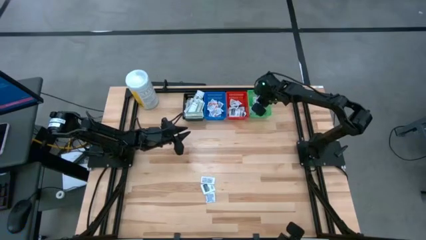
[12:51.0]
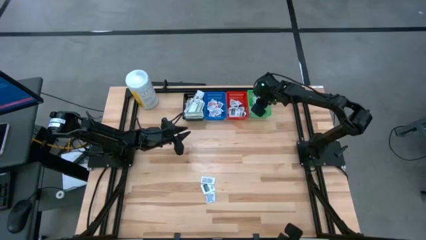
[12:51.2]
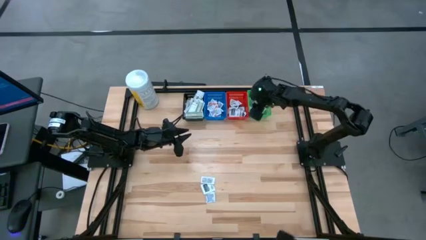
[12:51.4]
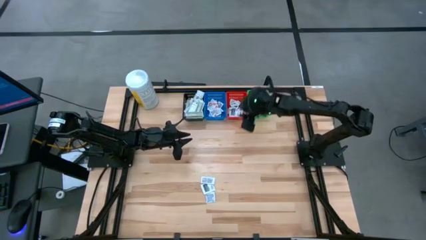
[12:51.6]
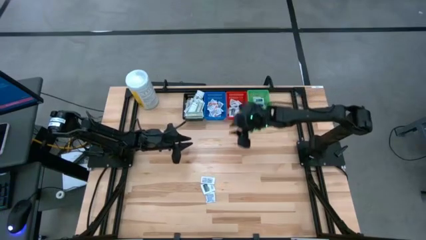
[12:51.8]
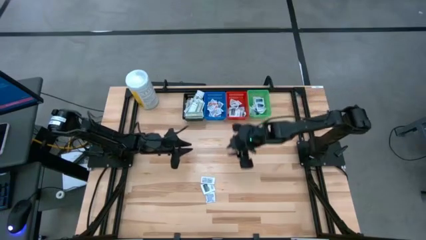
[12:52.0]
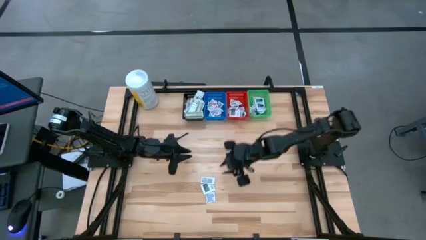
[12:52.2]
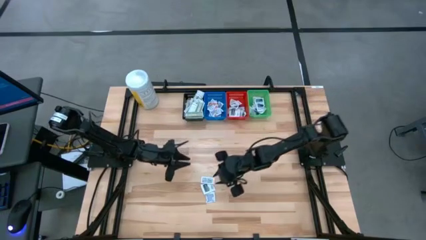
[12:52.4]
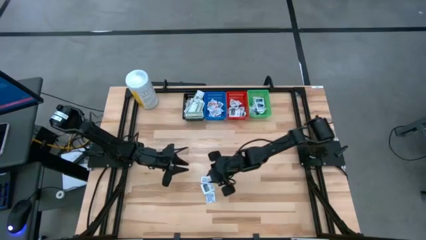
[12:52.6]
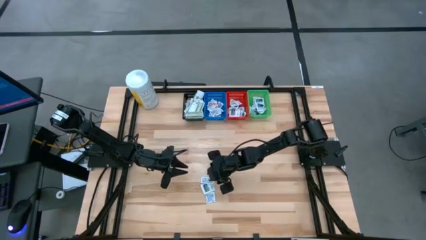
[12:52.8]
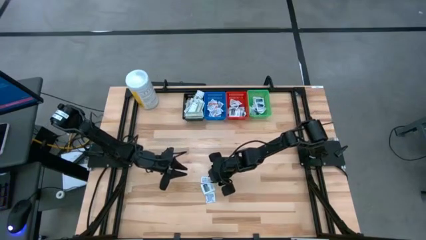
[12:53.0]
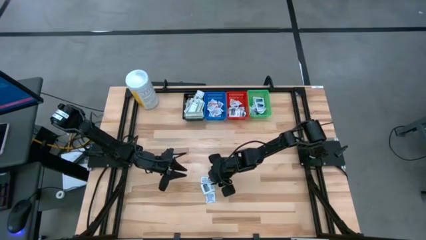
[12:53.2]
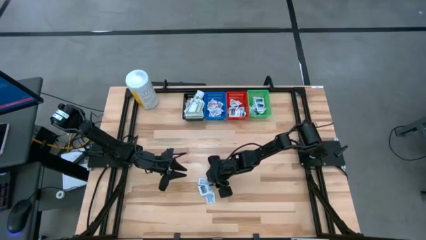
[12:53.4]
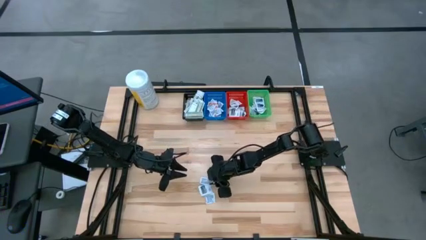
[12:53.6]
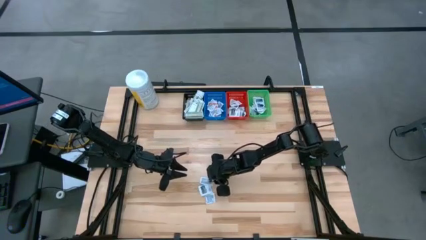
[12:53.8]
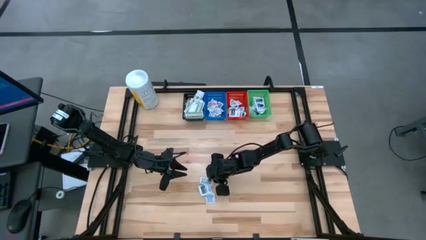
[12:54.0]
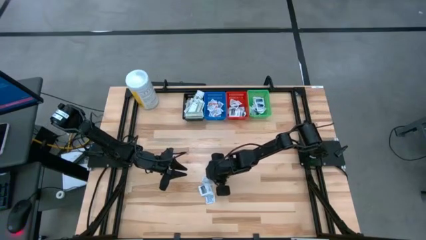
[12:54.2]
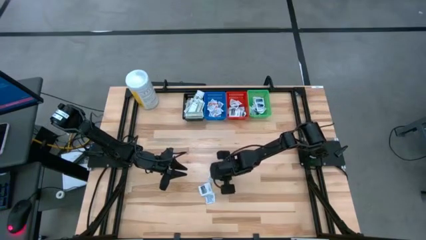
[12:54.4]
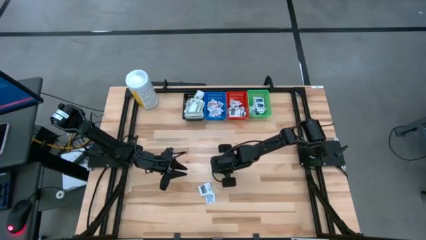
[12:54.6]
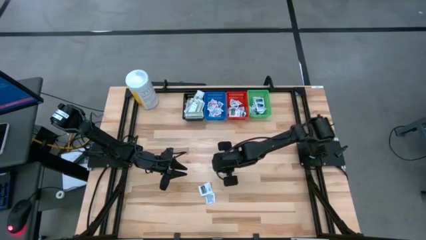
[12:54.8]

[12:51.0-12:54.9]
Task: Pick & Place First Aid Supplies
Put the orange ointment pack in the blue bin

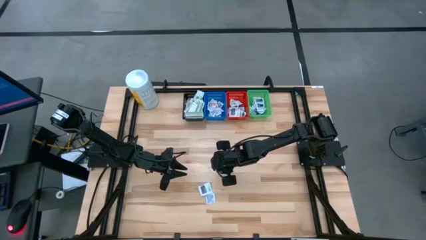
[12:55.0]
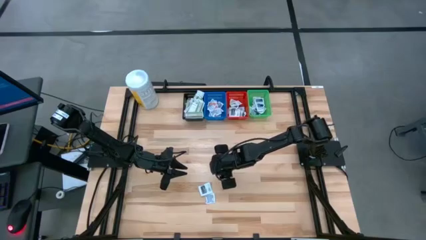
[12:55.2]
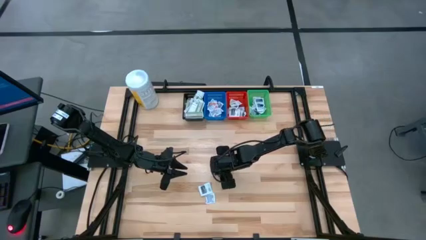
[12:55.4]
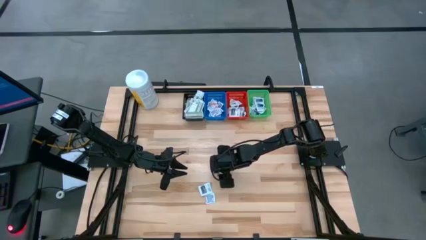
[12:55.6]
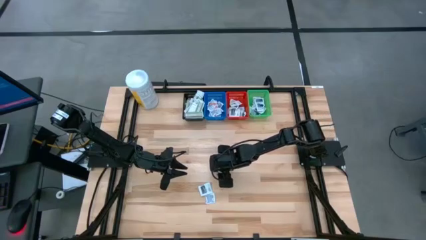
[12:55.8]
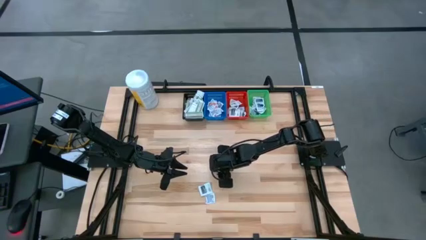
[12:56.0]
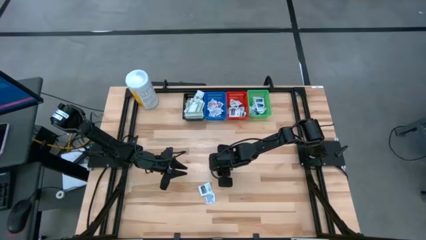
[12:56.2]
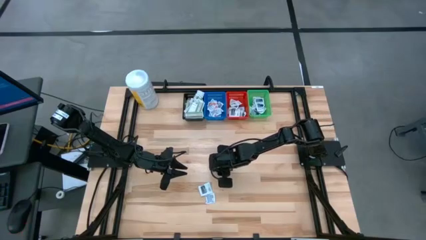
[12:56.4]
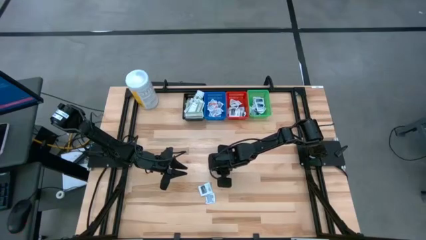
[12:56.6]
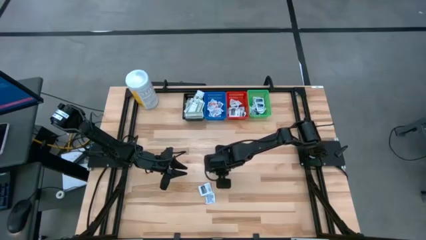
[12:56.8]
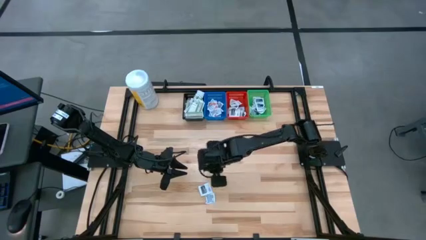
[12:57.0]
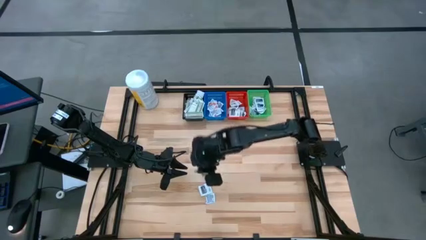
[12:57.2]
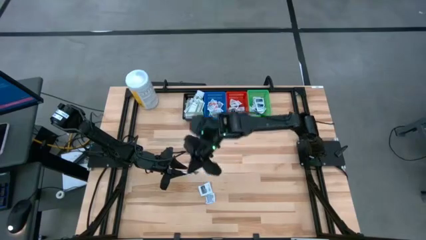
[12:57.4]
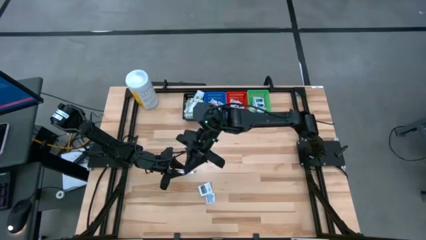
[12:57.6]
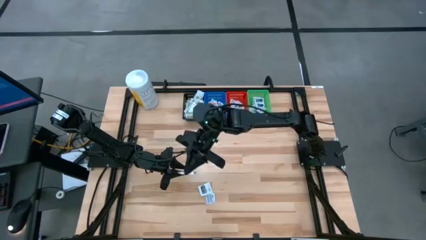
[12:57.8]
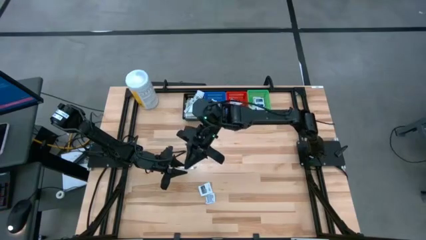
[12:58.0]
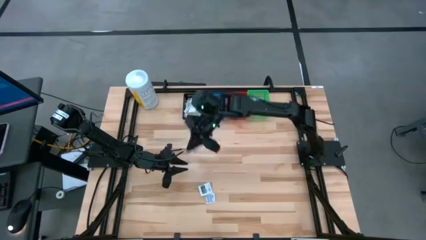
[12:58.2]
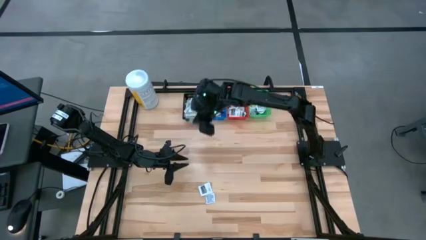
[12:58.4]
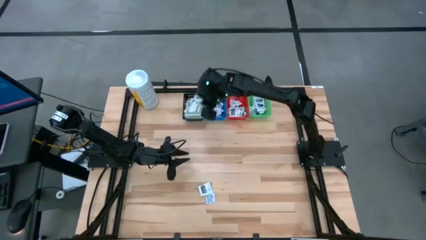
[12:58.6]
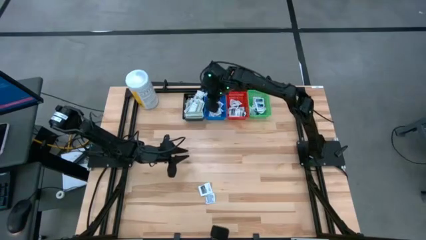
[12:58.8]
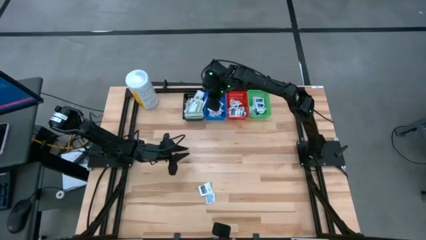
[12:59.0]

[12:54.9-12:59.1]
Put the orange ointment pack in the blue bin

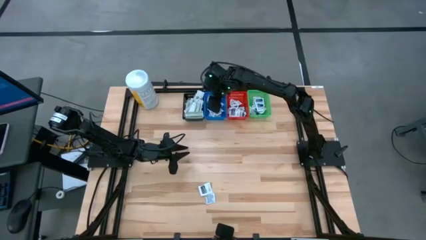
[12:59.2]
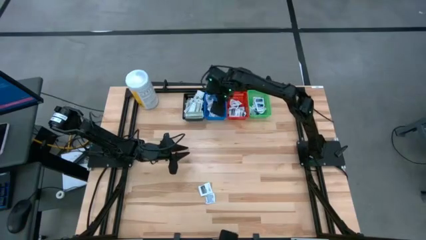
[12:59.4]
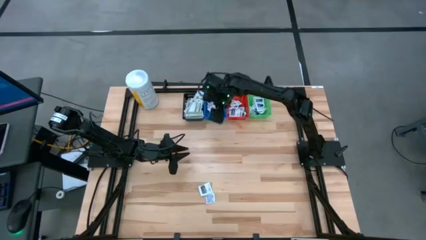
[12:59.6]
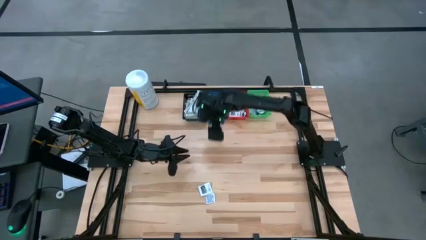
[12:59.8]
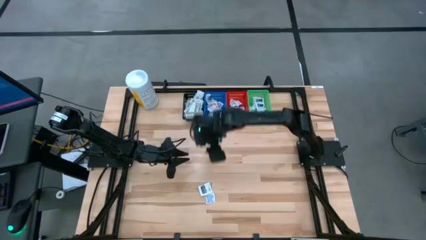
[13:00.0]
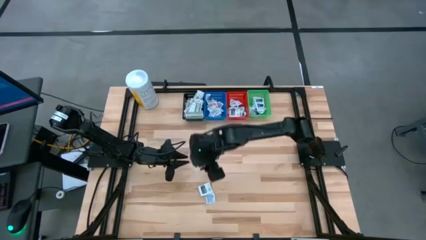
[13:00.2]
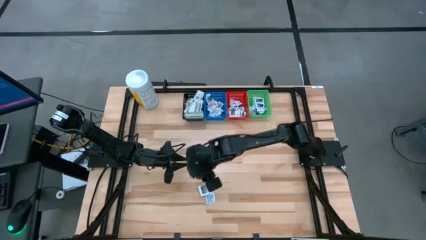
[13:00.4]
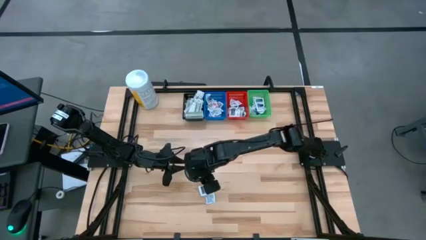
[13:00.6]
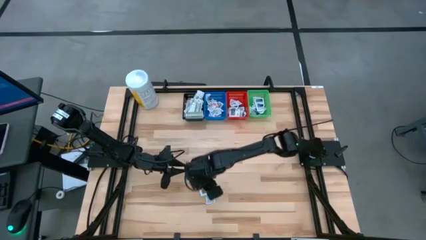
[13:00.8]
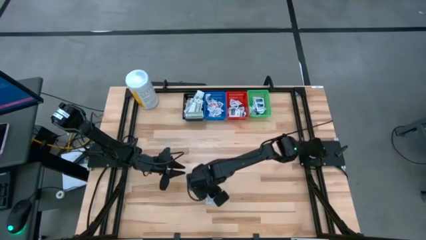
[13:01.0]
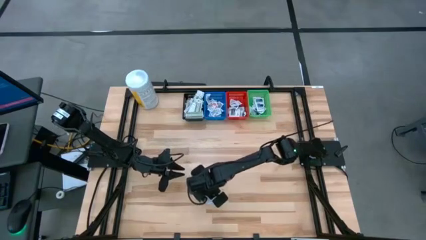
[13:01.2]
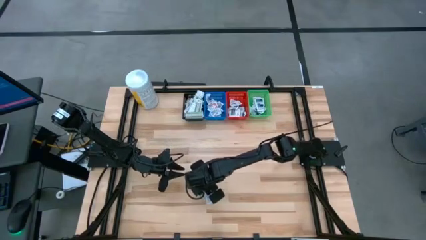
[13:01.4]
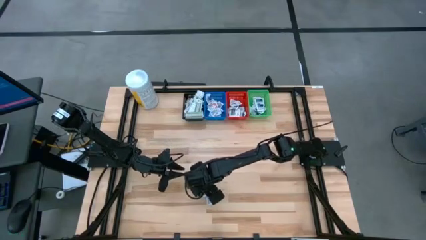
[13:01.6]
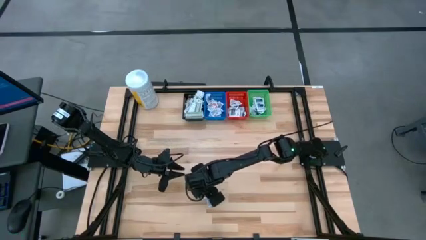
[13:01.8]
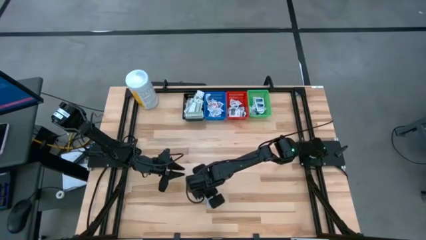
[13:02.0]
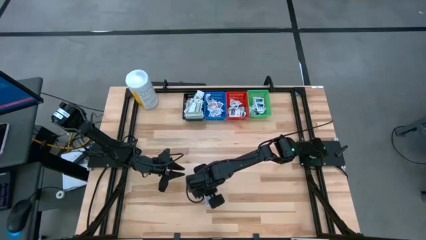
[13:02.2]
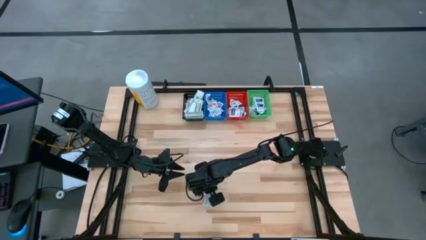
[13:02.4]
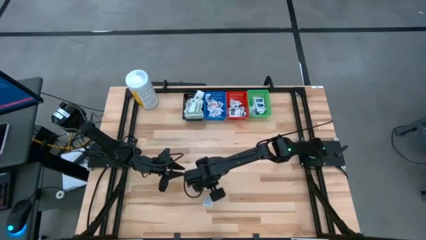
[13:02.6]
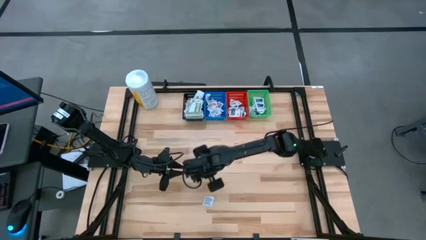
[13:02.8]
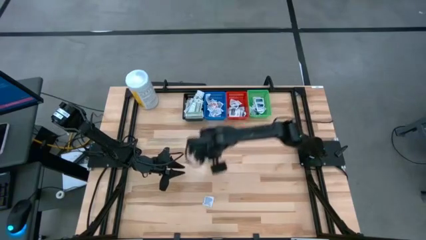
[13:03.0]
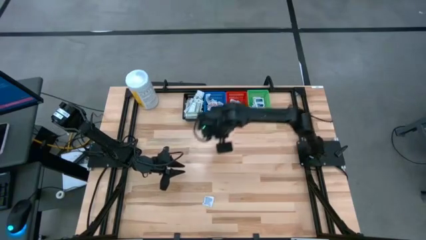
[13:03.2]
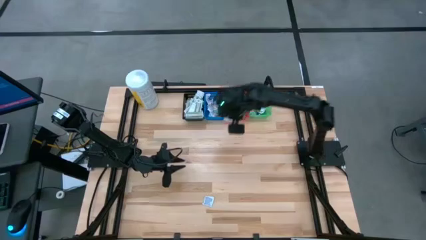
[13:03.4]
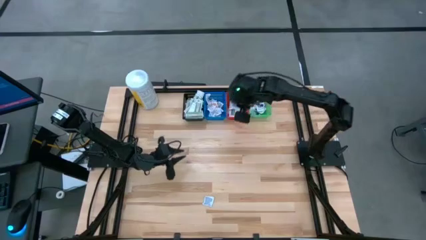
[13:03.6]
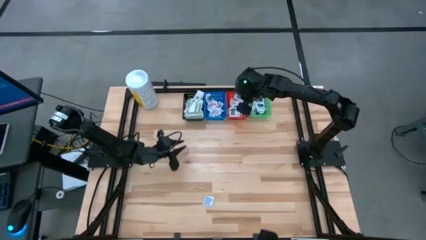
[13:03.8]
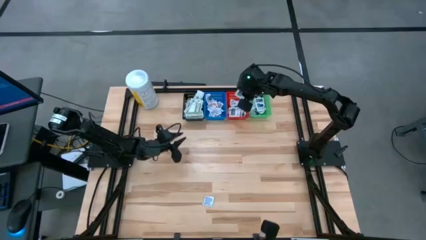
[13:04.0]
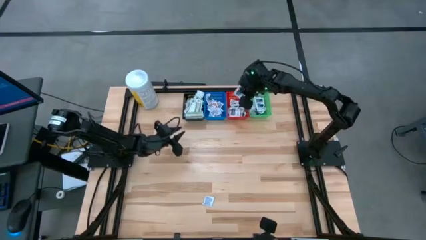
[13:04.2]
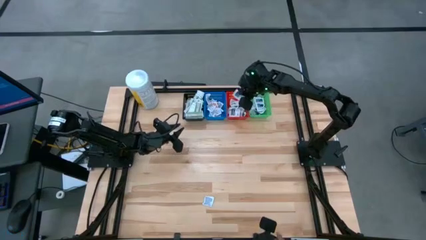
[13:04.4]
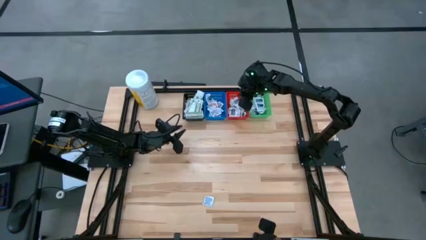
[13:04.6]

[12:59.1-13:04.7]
Put the gray towelette pack in the red bin

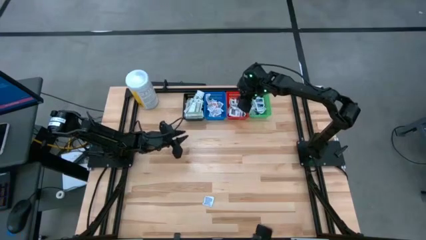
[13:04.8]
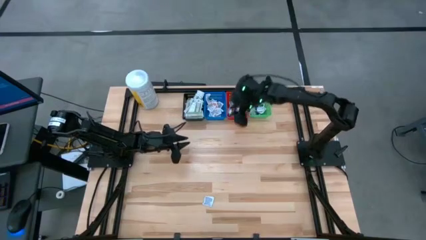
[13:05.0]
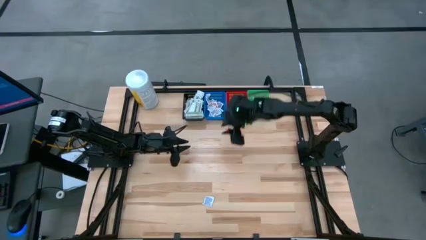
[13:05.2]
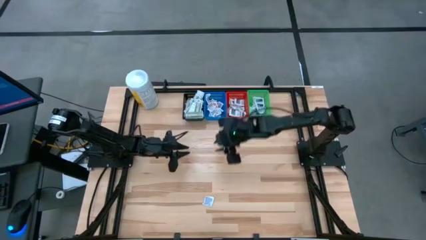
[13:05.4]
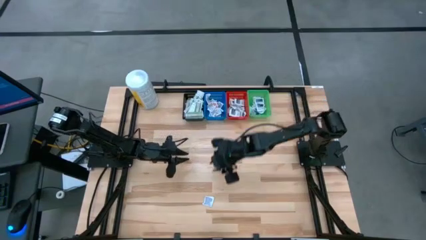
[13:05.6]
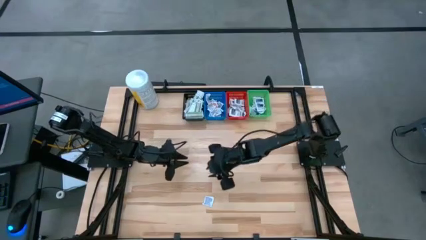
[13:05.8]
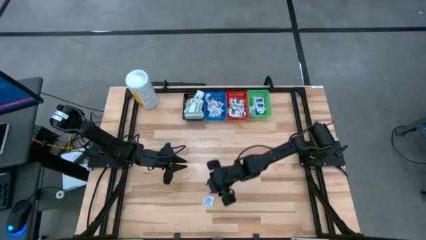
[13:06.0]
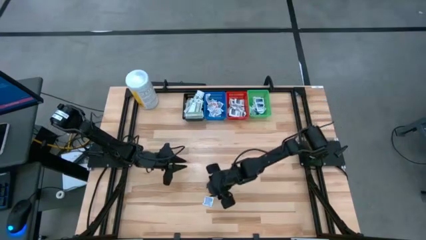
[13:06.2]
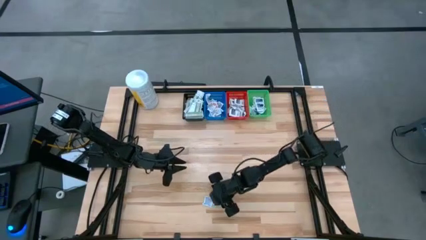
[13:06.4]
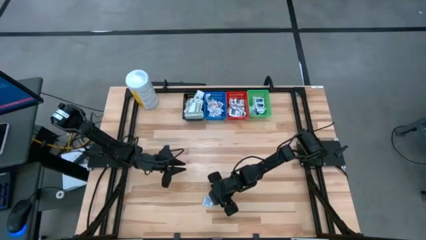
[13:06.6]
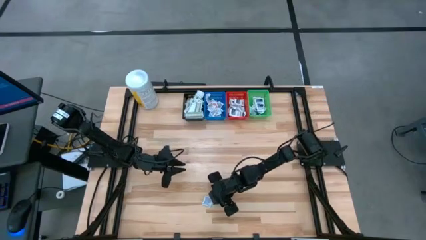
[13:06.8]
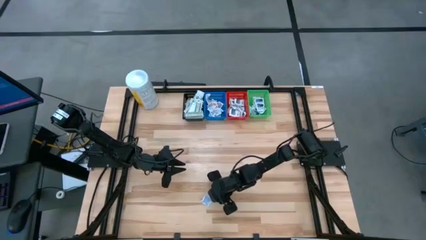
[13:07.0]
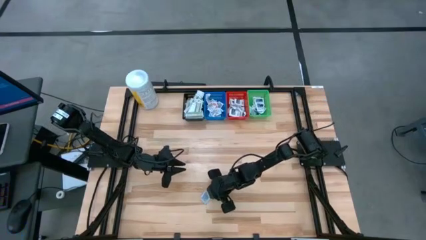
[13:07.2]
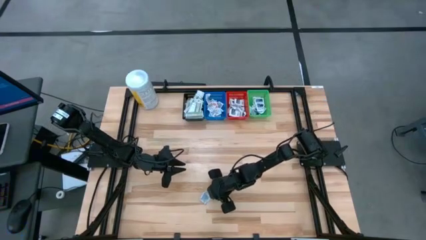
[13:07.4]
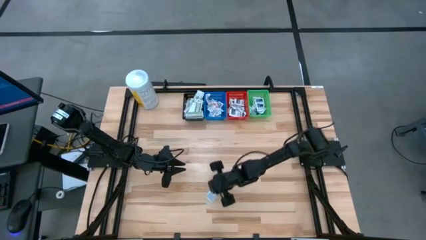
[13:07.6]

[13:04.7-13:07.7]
Put the blue alcohol pad in the green bin
